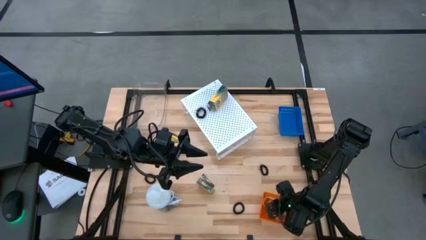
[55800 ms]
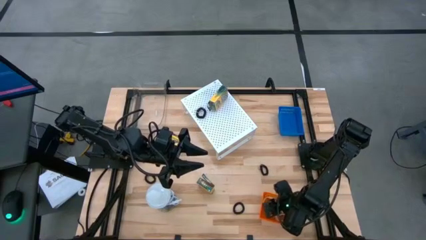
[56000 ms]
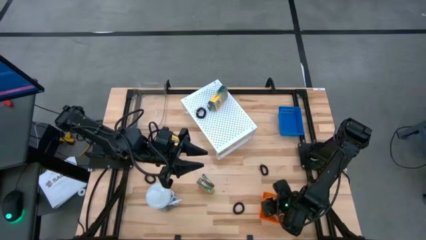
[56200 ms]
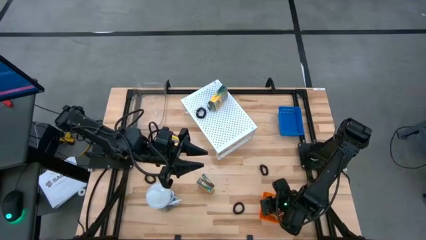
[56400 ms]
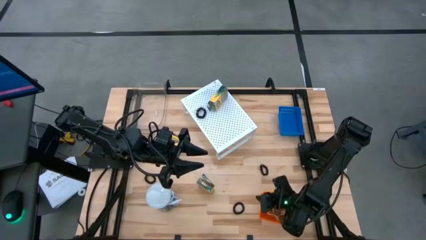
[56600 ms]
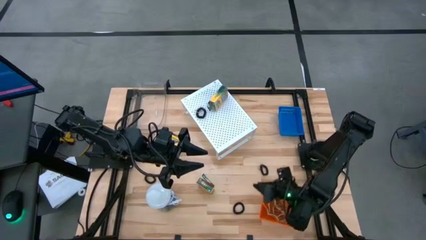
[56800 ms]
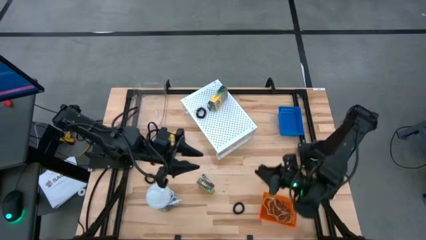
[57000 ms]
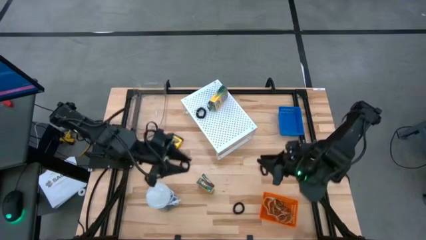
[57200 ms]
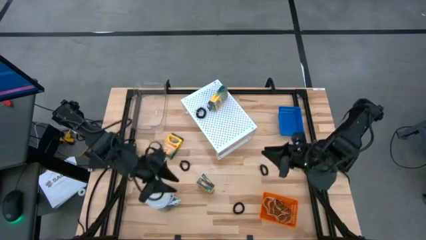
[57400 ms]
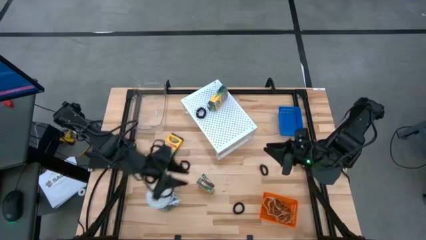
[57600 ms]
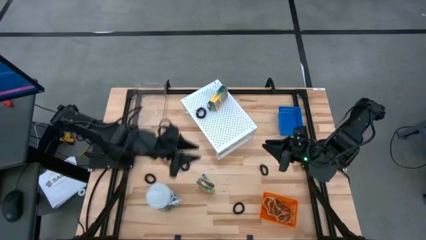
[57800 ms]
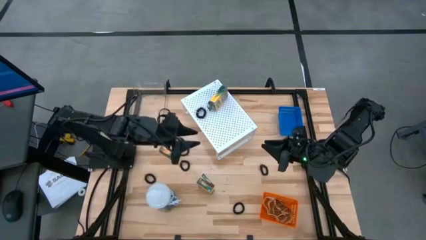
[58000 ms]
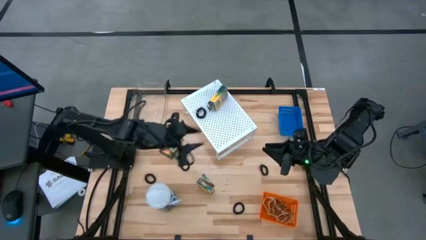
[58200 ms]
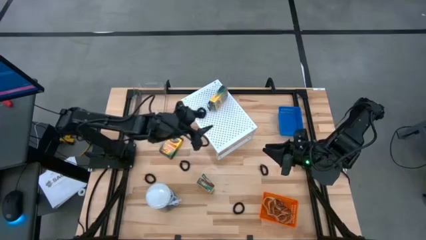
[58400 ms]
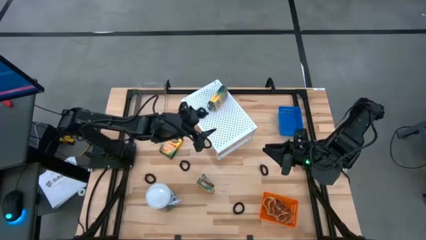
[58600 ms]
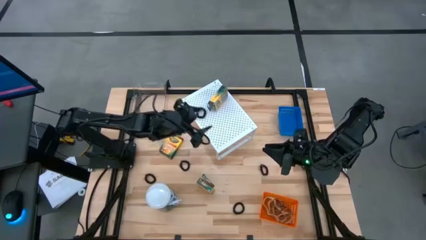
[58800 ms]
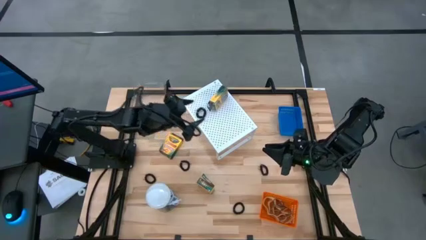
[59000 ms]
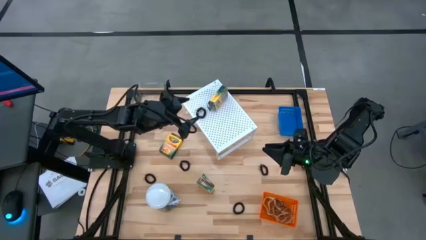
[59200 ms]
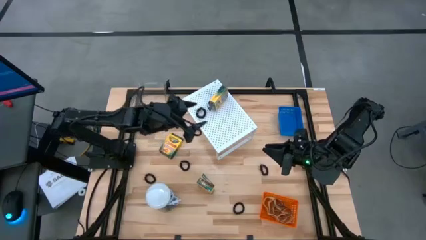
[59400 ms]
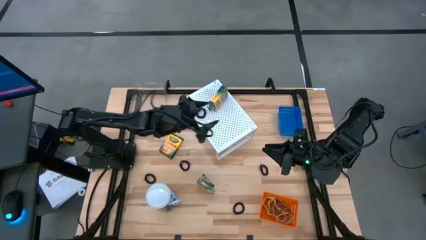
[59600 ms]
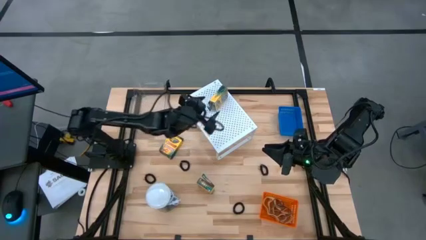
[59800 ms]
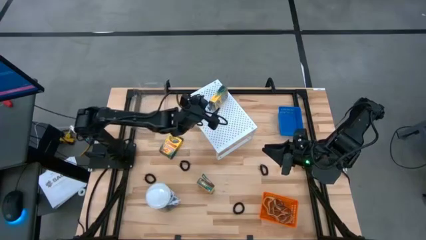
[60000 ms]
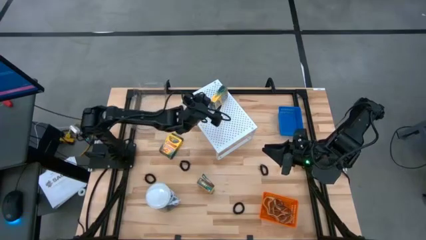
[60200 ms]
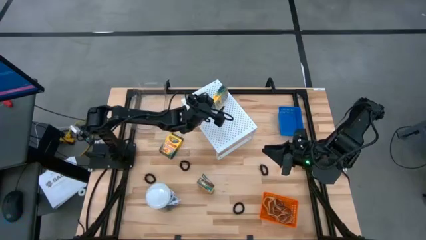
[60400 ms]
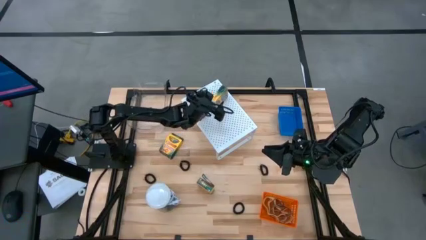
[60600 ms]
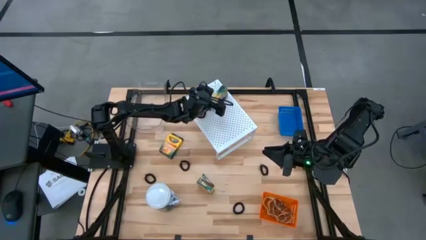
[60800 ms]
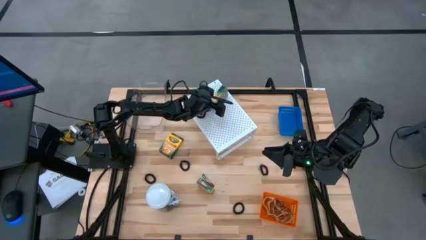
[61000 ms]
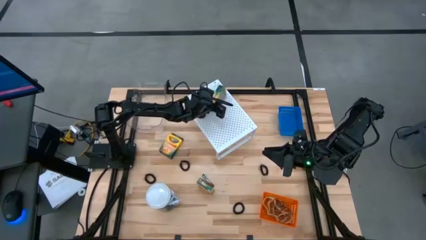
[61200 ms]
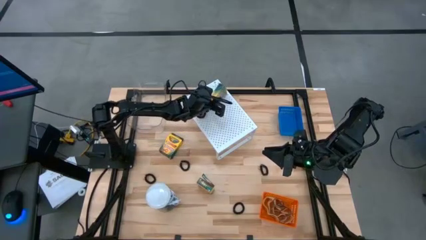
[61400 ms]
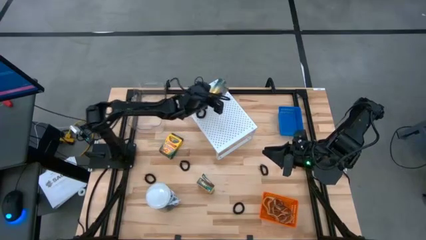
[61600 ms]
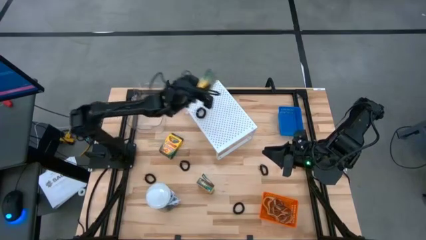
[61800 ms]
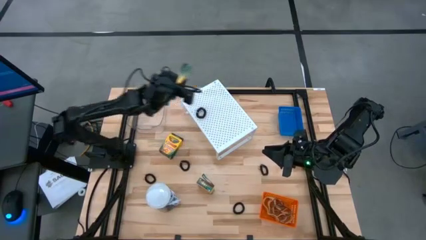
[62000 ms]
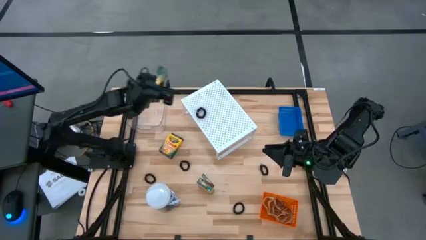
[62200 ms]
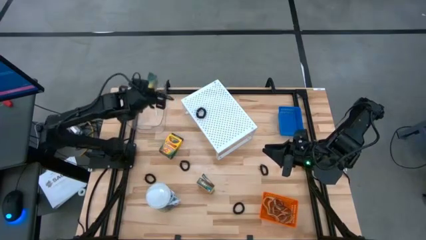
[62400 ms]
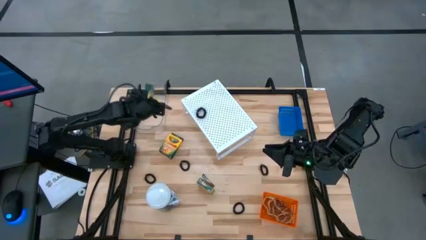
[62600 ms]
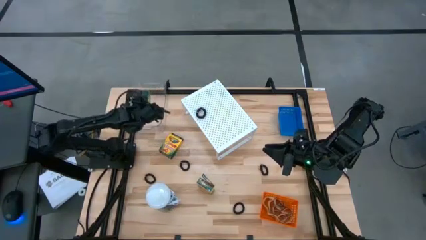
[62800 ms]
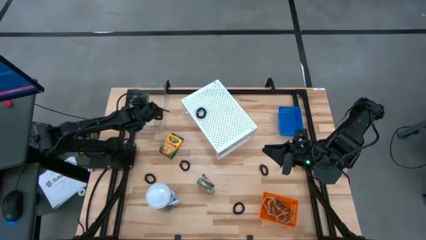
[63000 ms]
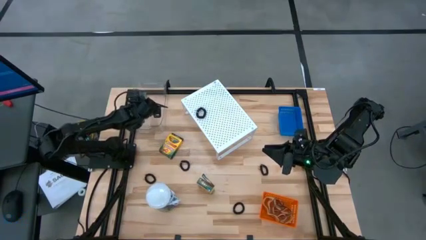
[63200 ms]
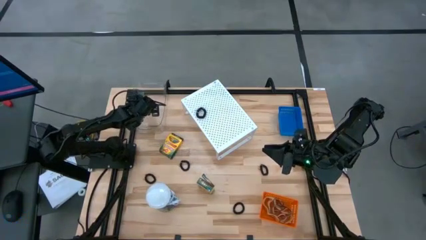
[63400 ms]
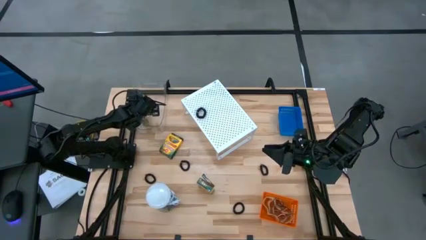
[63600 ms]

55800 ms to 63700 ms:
Task: Pick & Place Office Desk Supplies
Put the crayon box from the shelf into the transparent bin

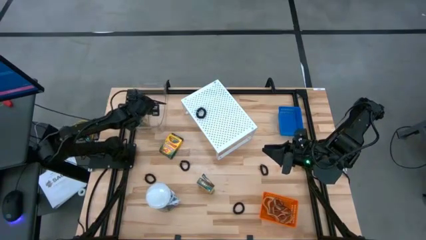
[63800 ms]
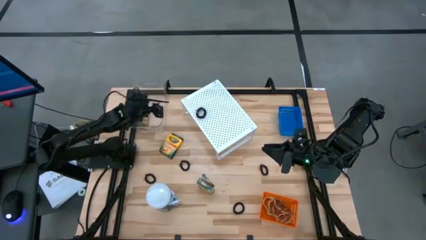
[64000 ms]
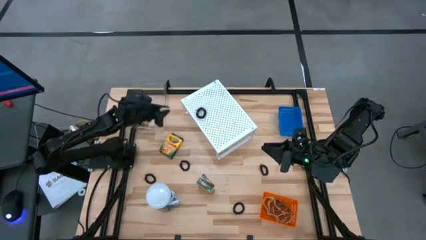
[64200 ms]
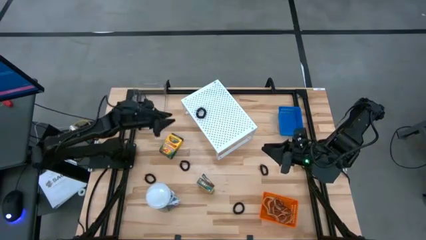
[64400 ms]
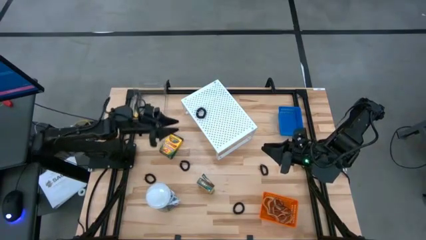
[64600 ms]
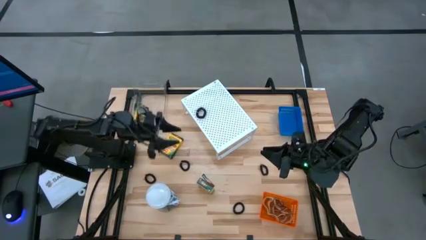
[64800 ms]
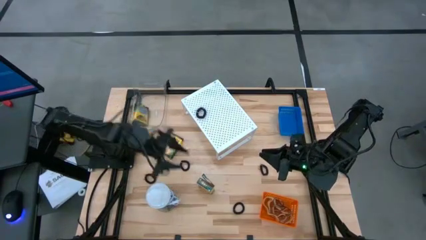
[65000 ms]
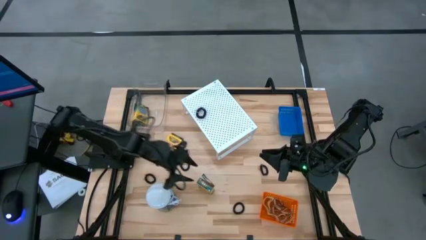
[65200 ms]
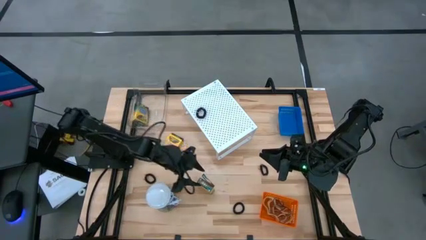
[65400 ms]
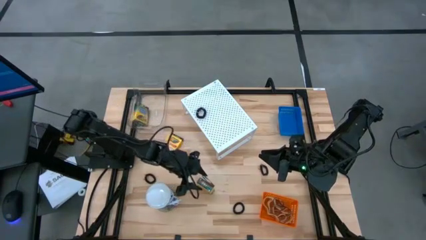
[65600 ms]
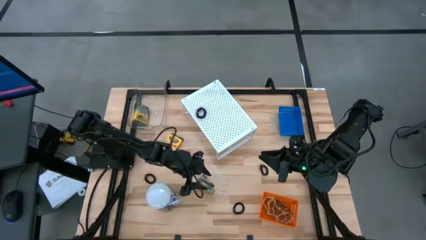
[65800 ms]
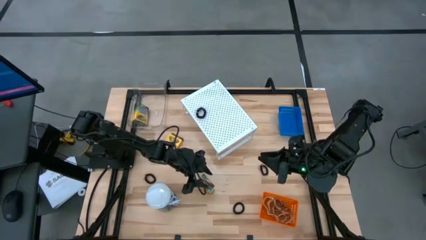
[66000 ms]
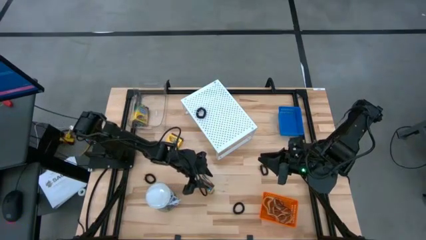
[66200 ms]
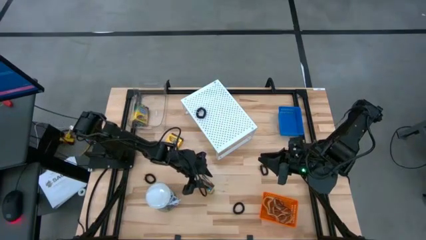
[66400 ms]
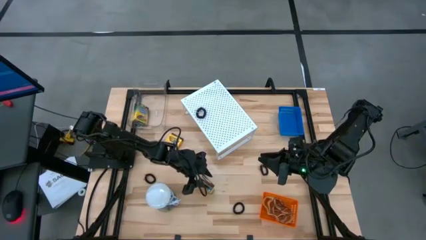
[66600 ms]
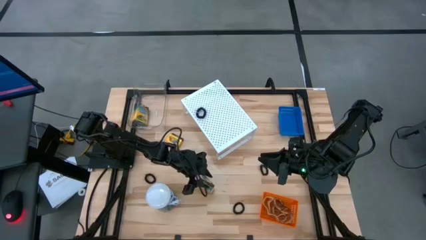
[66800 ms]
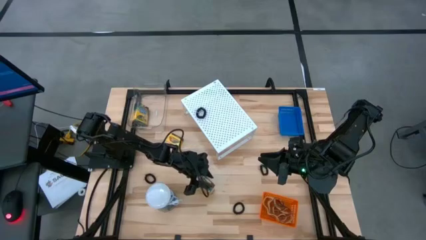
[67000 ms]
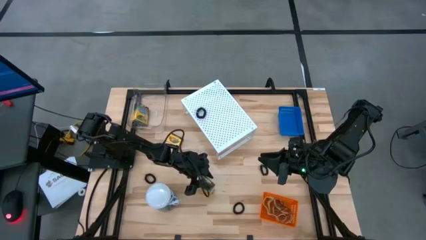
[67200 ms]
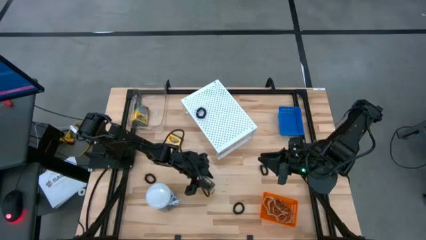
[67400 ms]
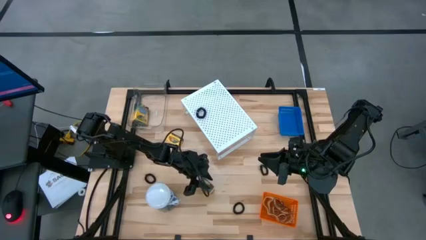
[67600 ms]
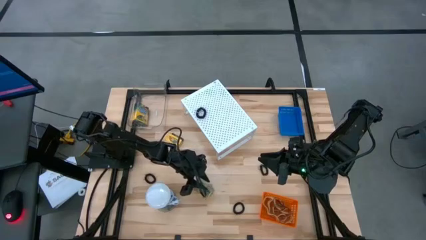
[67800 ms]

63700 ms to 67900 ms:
Put the crayon box into the transparent bin
